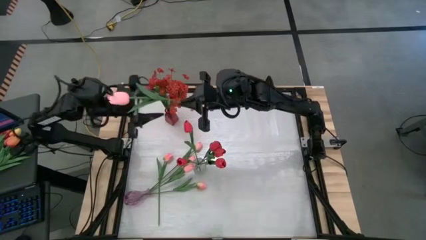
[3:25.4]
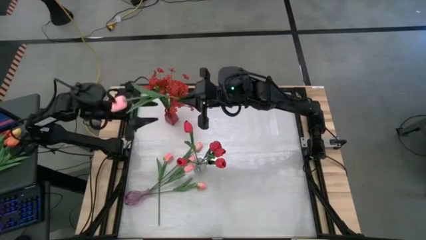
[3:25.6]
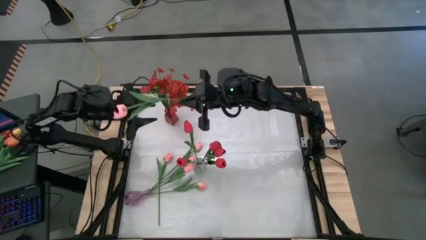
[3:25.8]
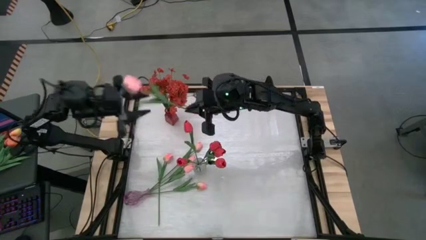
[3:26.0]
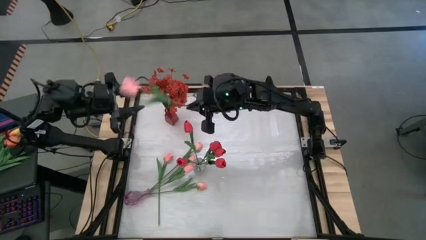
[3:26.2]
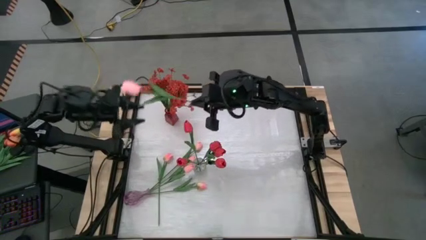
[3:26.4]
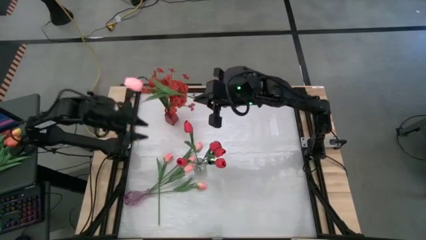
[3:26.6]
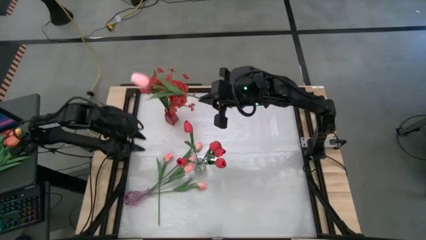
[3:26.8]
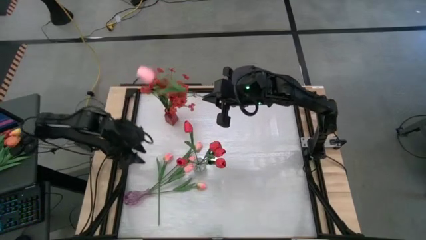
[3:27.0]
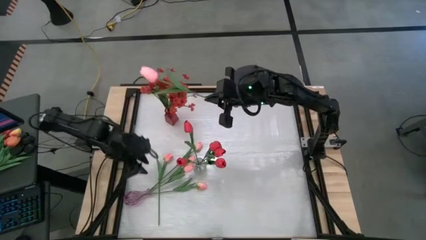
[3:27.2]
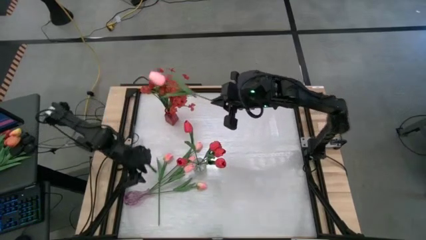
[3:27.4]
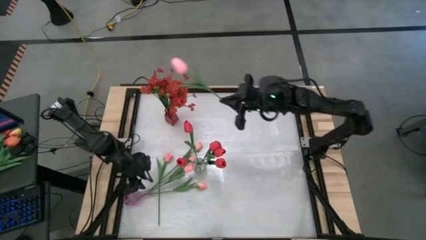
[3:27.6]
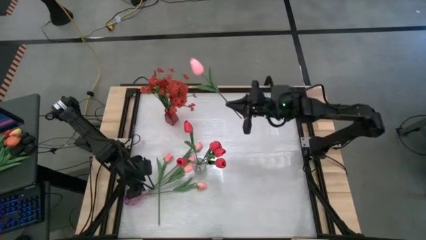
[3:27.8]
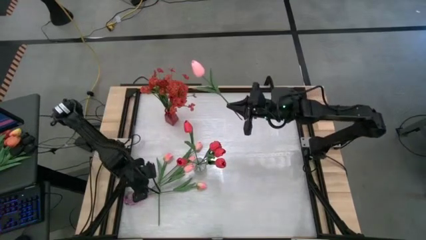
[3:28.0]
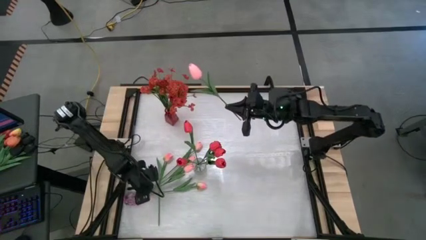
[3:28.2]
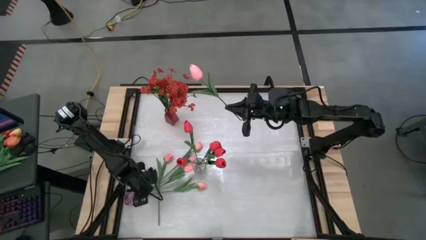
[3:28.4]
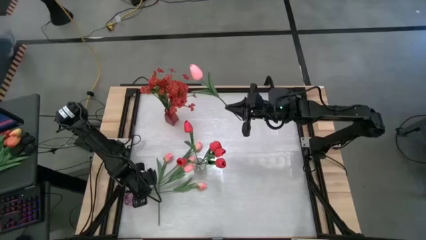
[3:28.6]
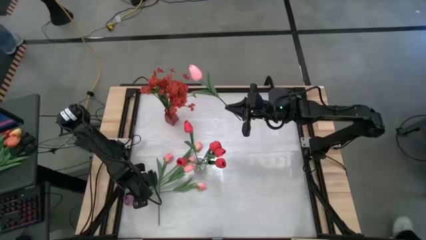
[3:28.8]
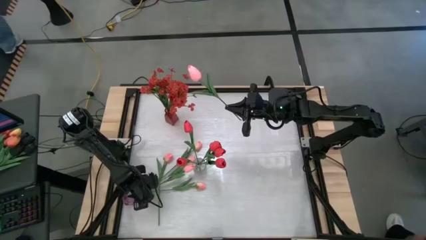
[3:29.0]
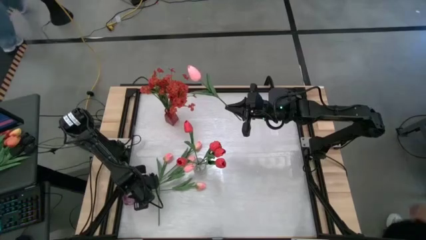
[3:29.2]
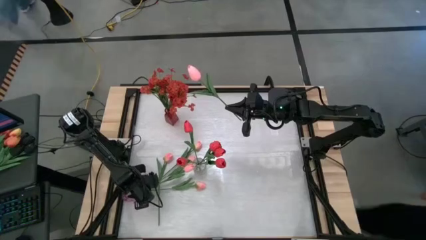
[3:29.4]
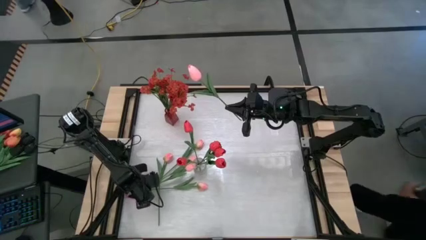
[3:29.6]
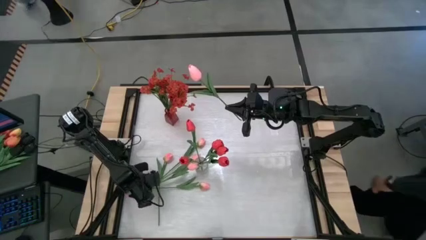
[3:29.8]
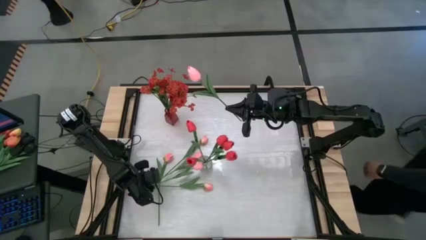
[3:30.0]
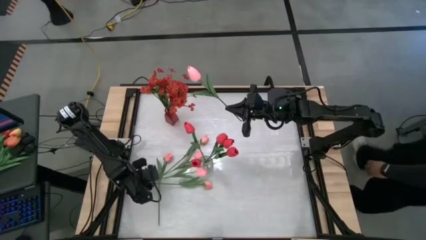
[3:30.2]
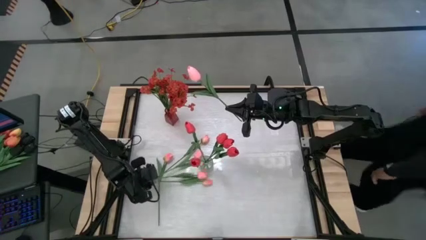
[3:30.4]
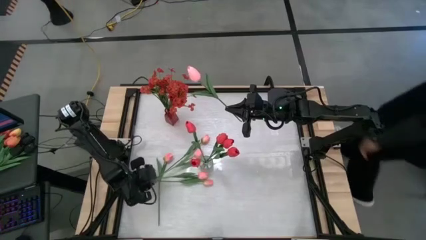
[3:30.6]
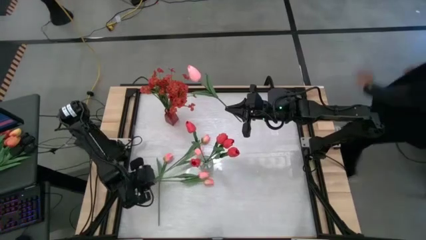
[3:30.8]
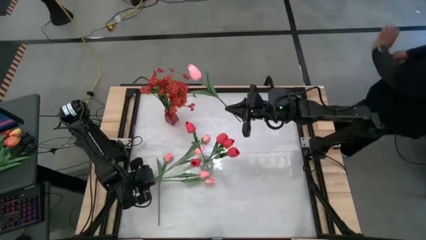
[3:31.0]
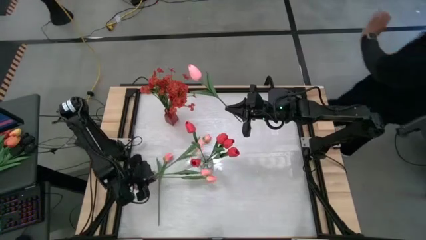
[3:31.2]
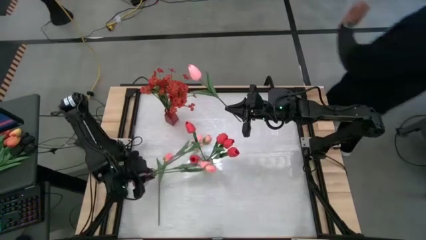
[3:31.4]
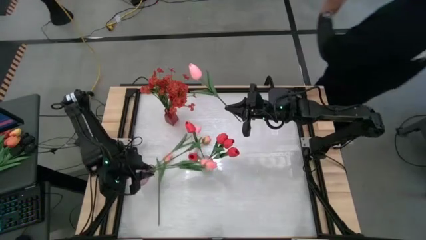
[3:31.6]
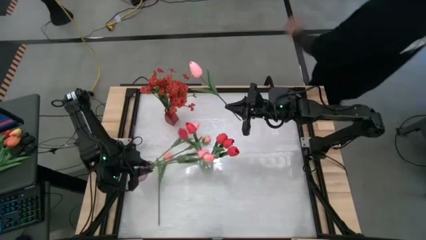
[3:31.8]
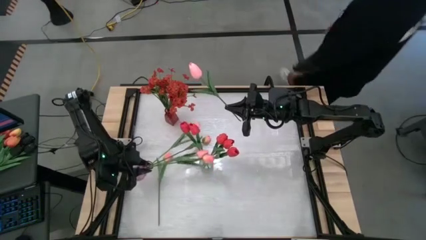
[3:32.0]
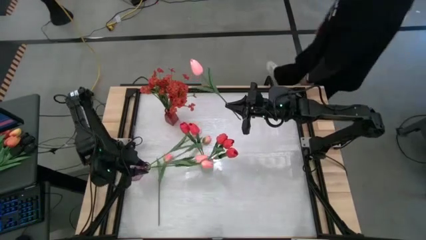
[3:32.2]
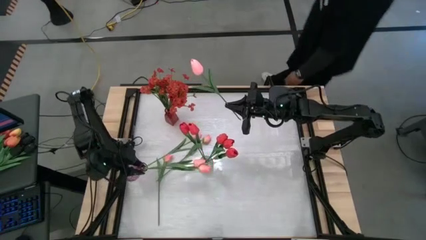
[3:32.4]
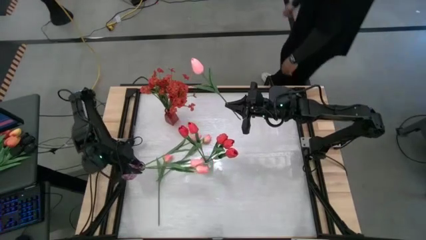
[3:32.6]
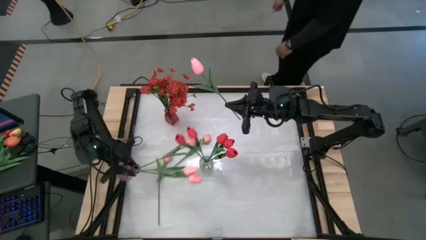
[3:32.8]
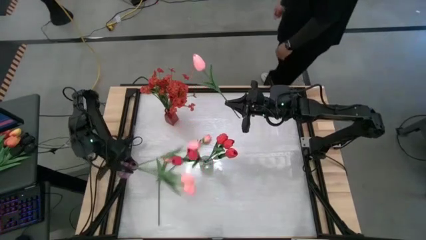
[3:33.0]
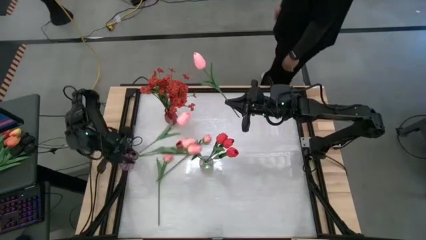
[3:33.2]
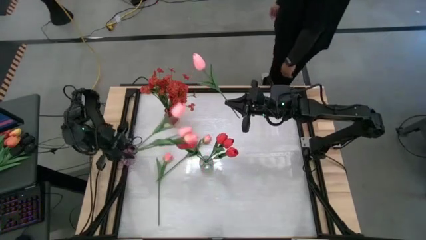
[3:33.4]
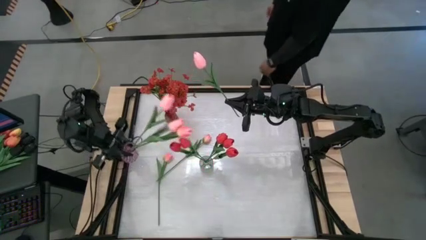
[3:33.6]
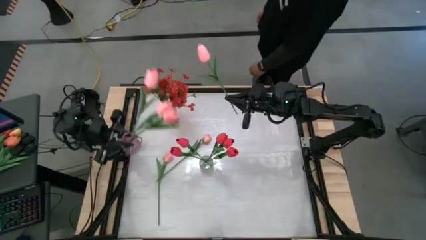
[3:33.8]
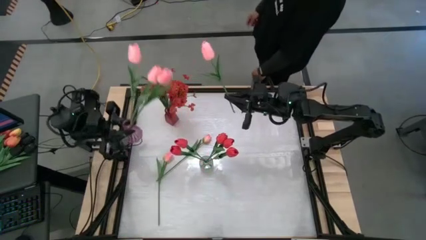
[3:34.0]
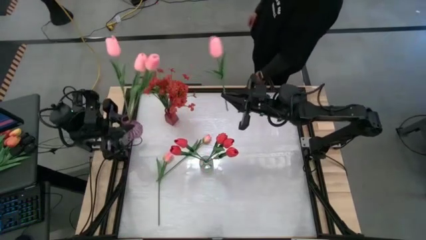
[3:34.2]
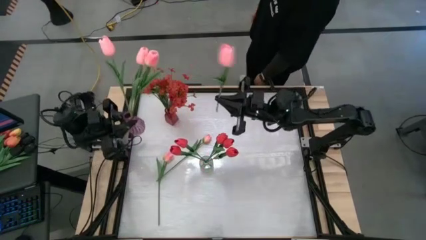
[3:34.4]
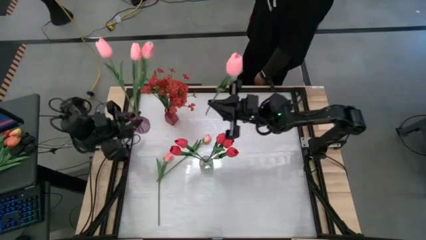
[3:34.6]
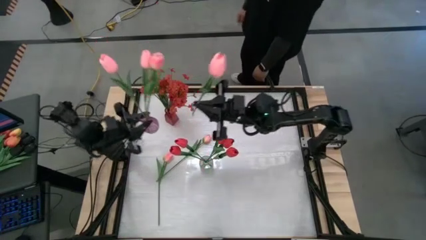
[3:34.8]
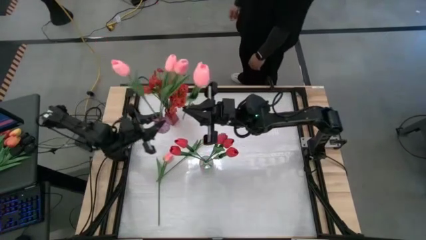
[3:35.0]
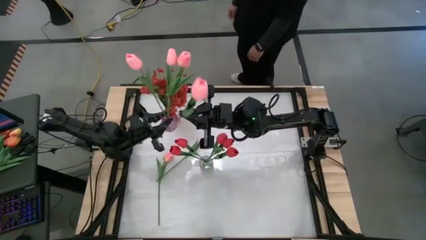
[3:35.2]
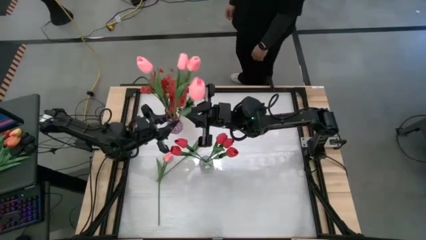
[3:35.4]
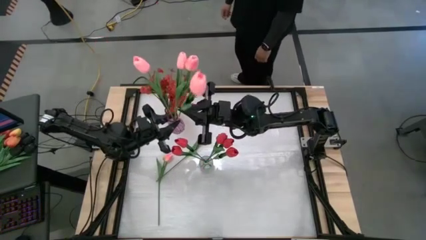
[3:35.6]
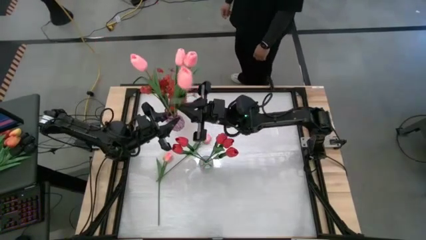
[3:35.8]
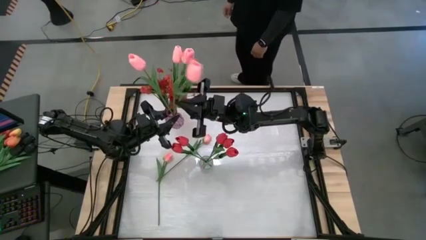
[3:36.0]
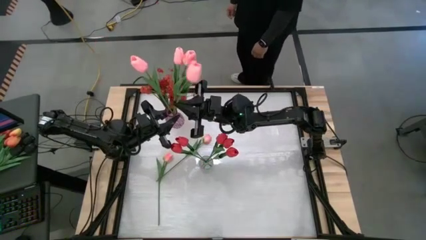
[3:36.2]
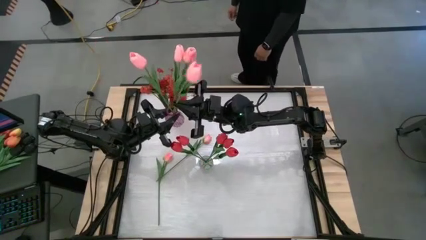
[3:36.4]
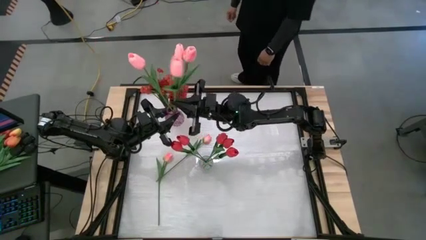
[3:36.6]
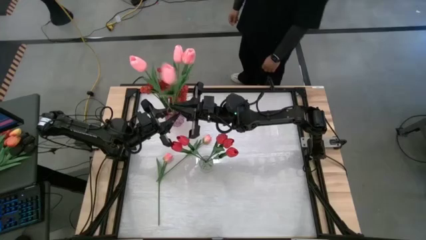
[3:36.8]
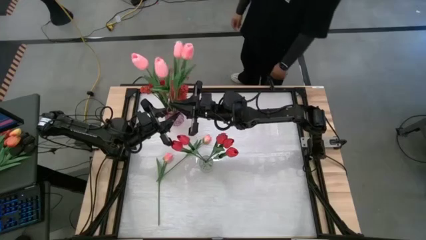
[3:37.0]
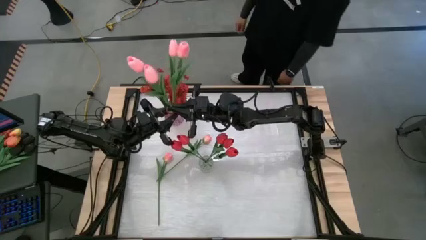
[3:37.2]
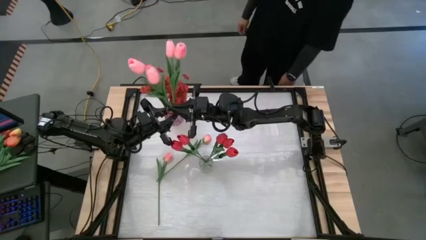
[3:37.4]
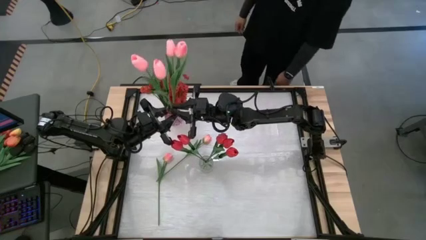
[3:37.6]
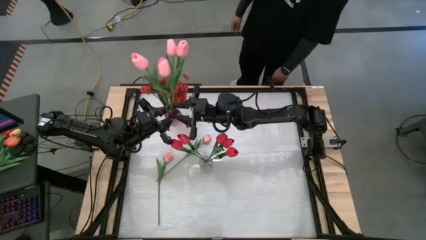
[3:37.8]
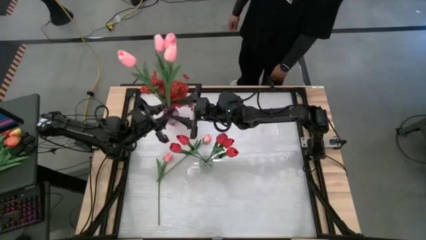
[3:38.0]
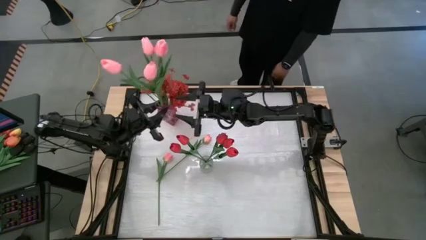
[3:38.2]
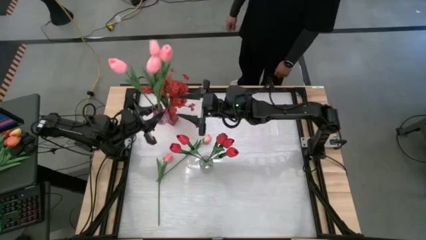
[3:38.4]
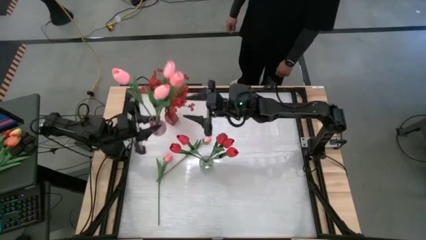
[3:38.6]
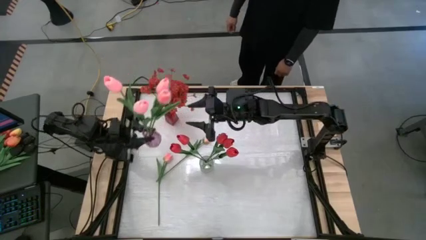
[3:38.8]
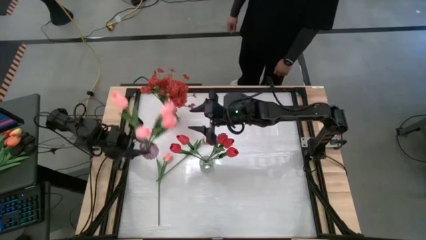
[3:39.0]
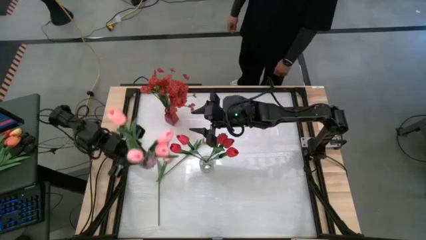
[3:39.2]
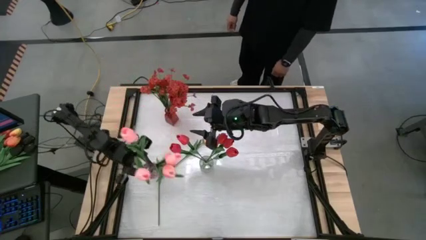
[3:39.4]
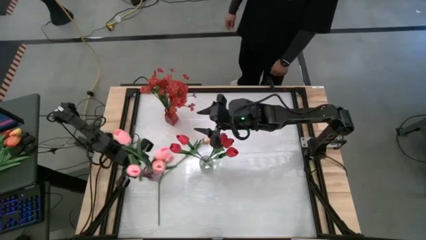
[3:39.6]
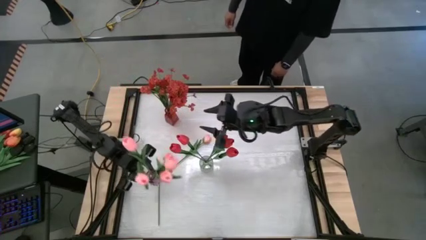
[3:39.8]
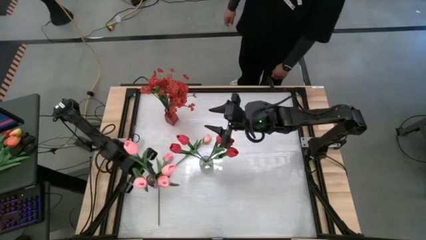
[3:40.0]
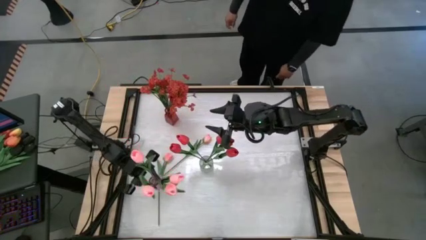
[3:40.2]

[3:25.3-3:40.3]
Task: Sort flowers into vase by color
Put the pink flower into the purple vase
